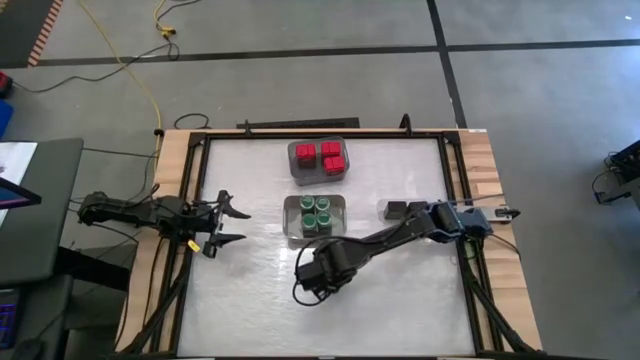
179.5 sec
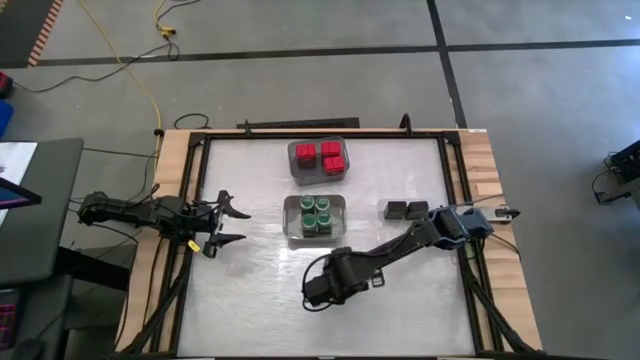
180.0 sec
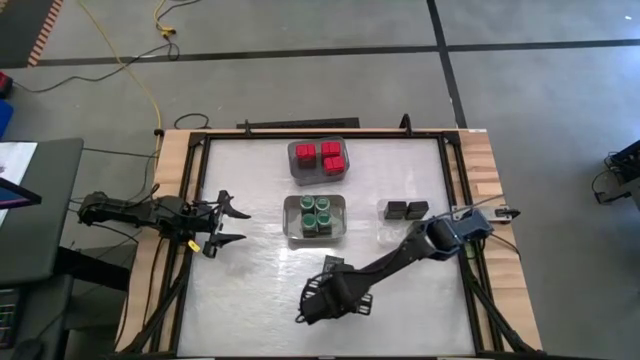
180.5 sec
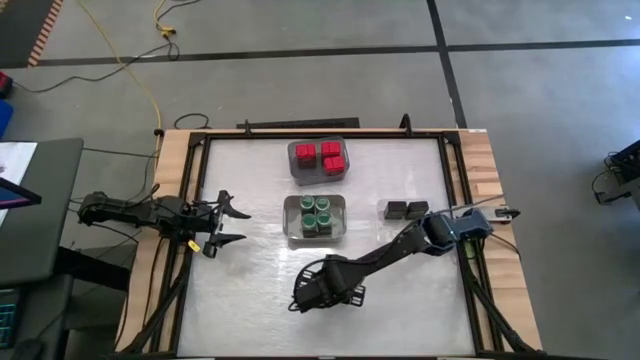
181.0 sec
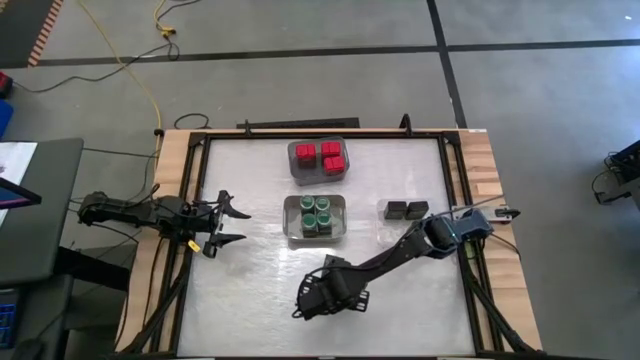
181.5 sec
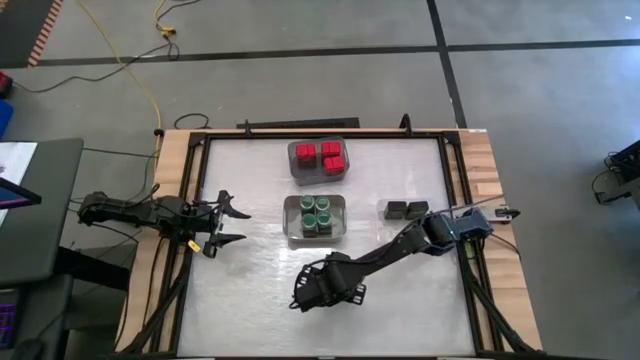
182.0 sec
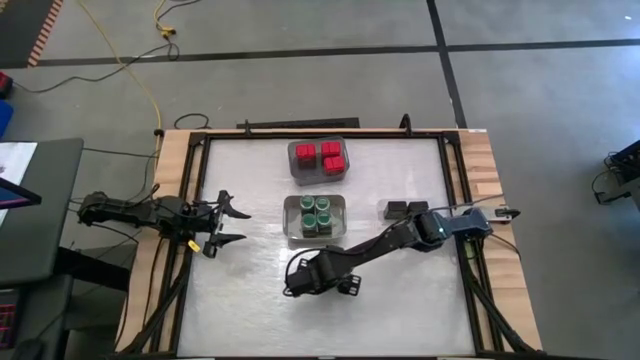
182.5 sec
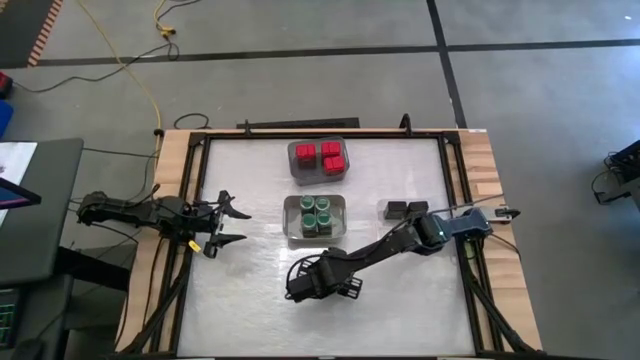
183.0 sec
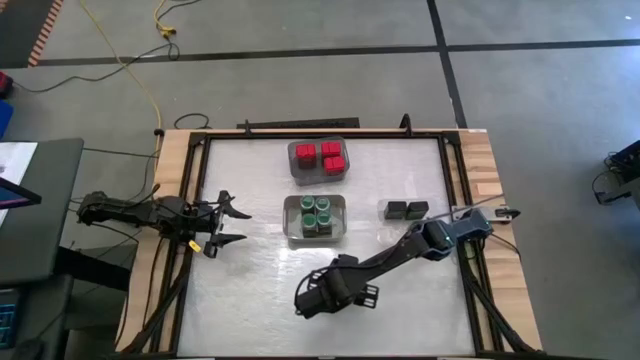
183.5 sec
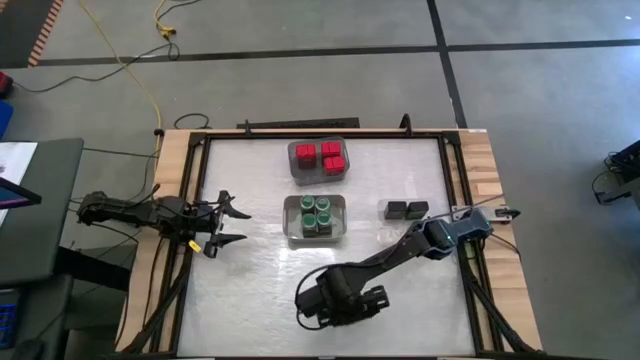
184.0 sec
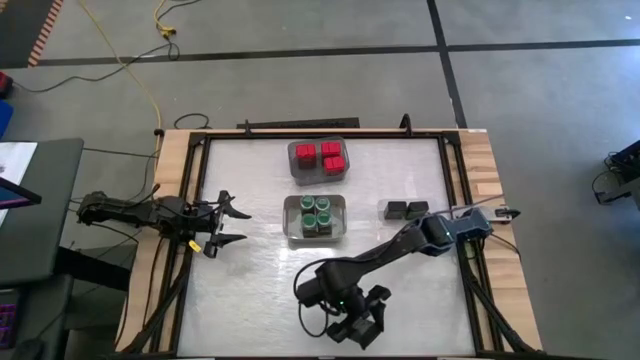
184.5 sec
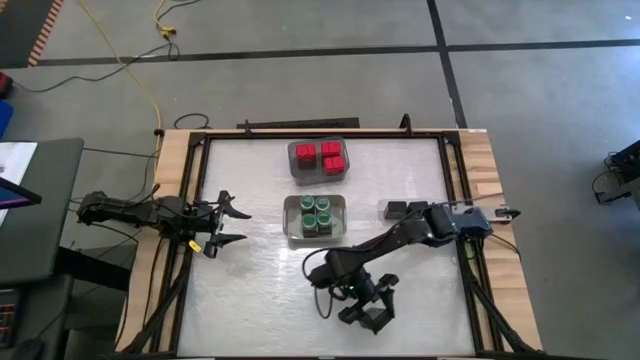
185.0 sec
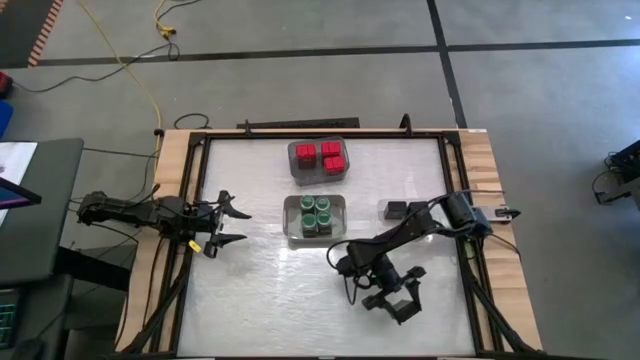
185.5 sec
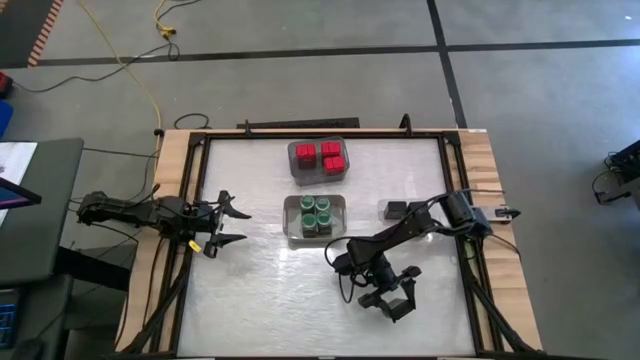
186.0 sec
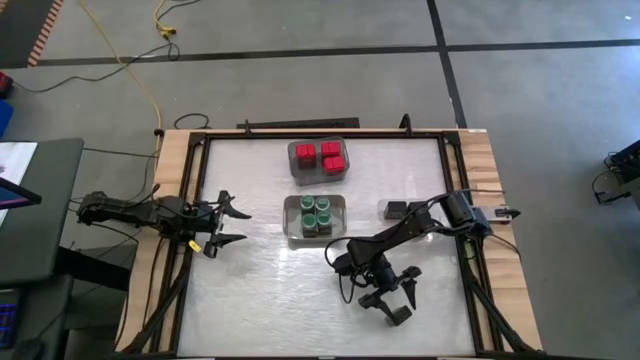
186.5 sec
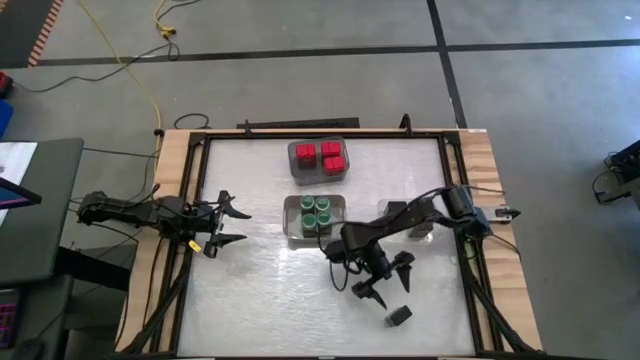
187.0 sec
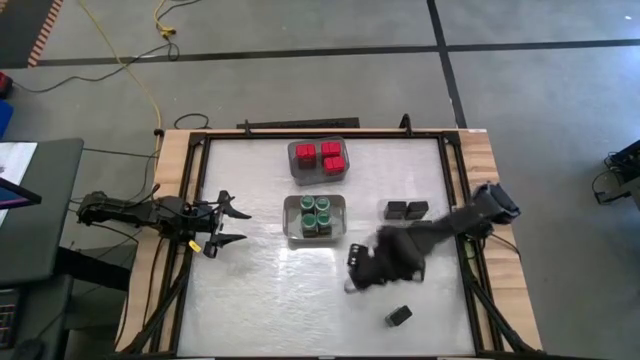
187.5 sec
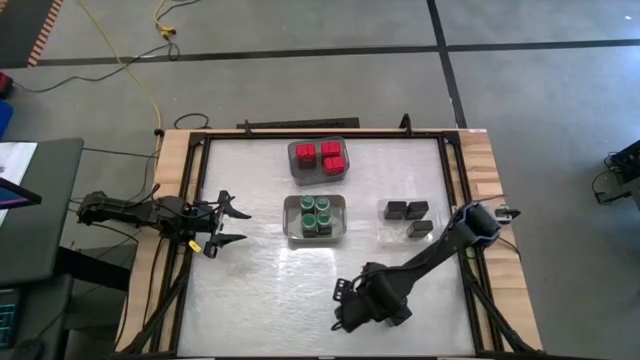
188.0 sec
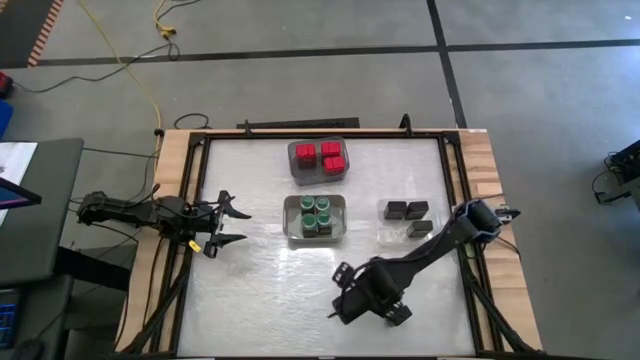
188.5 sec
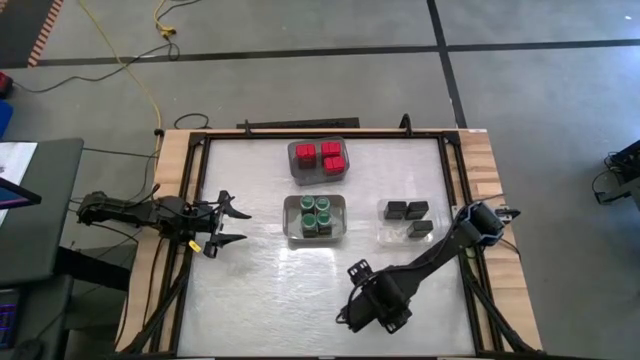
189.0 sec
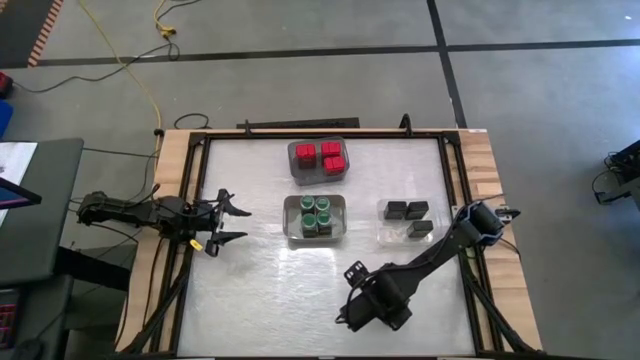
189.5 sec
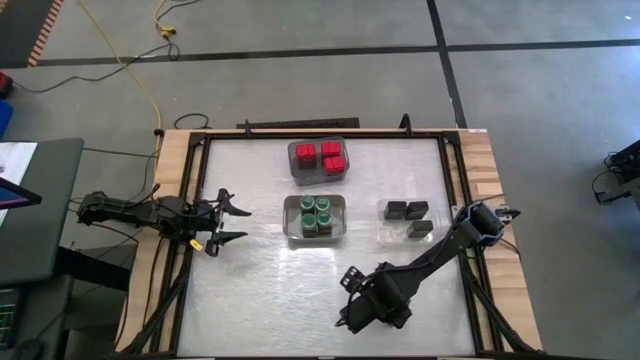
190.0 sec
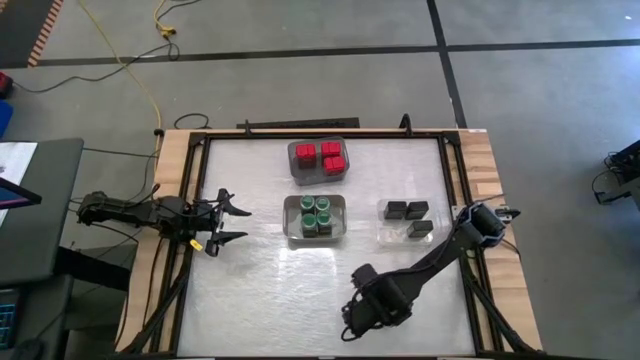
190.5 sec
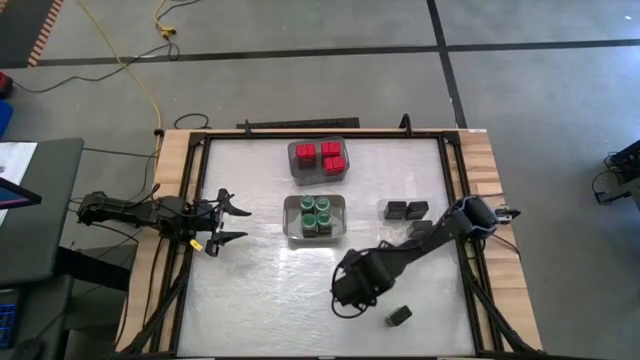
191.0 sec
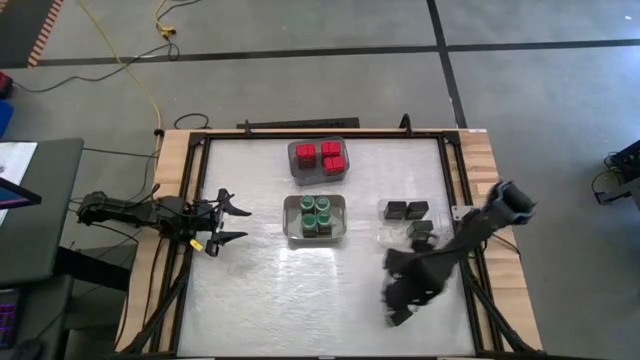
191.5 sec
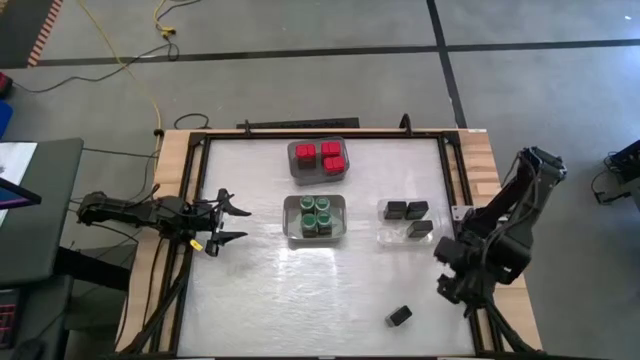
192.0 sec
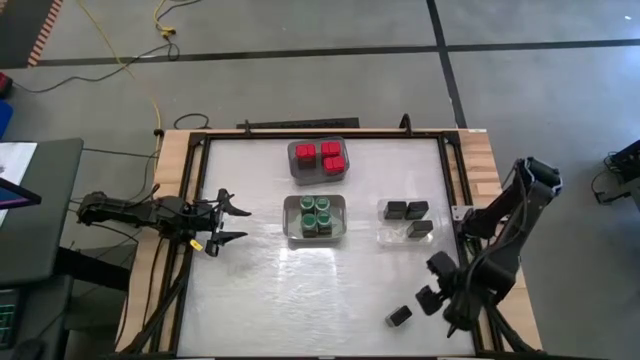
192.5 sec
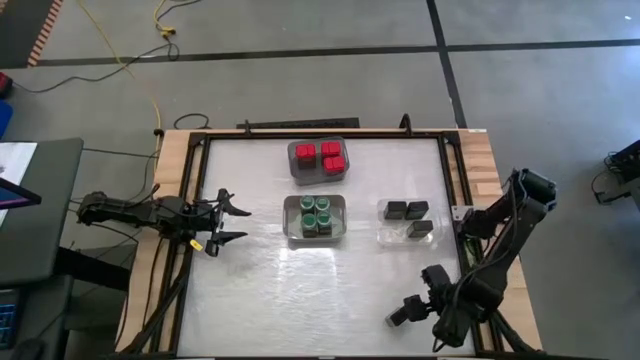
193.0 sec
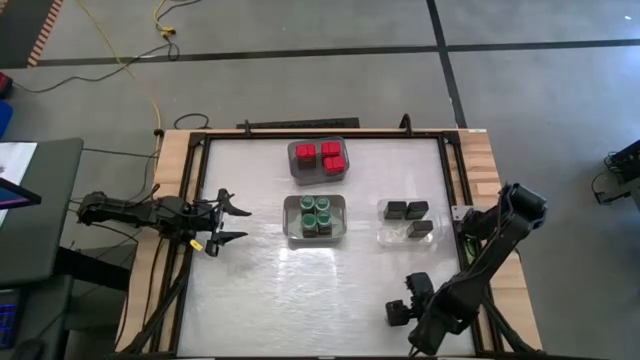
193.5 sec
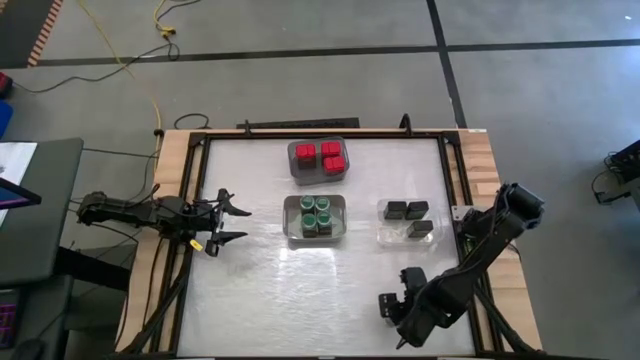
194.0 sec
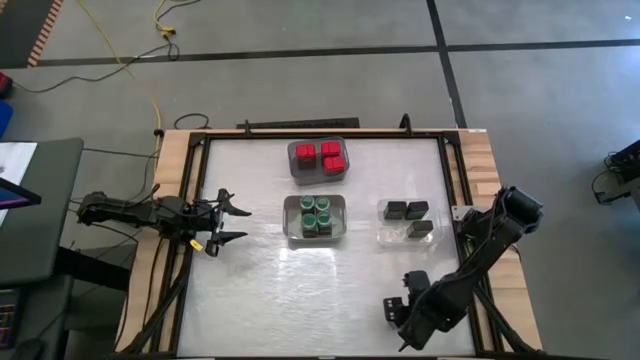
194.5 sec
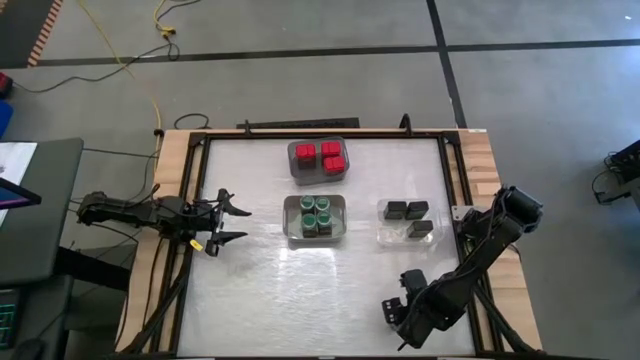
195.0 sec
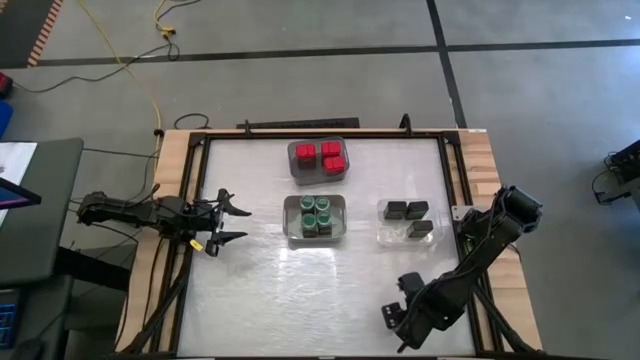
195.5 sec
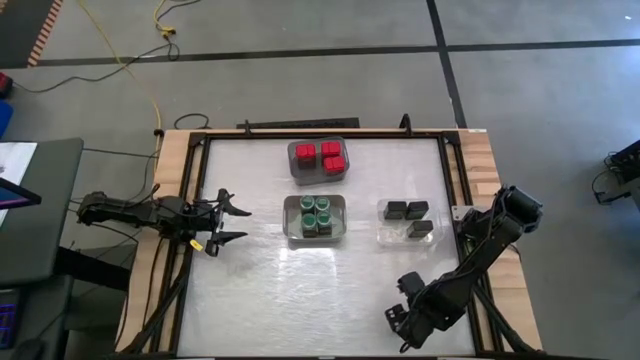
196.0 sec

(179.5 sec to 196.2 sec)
Task: Sort spices by type
Put the black spice can into the transparent bin

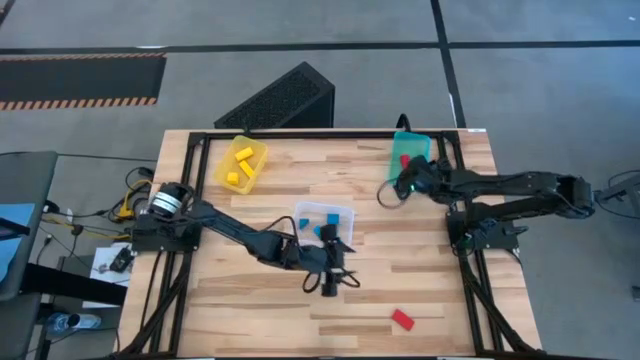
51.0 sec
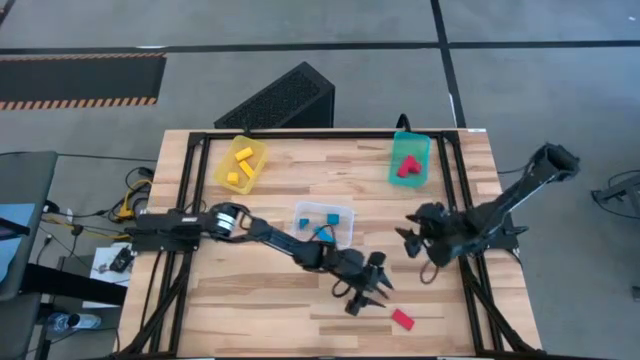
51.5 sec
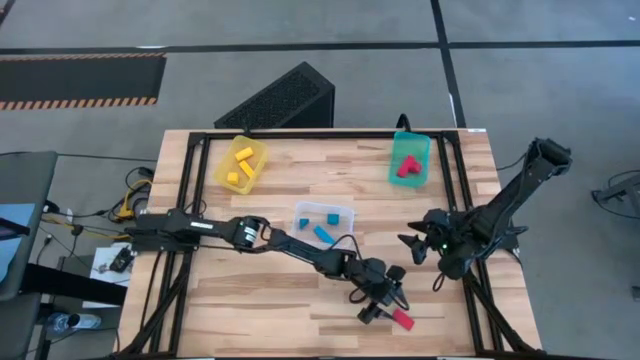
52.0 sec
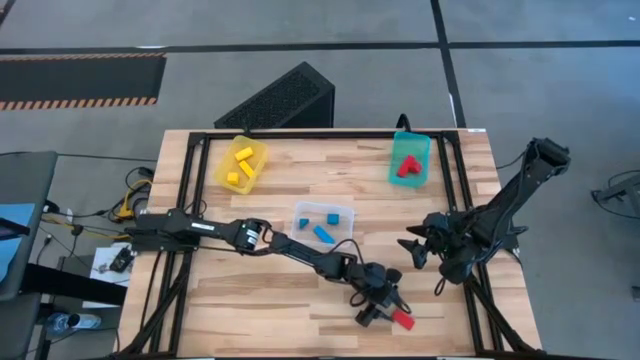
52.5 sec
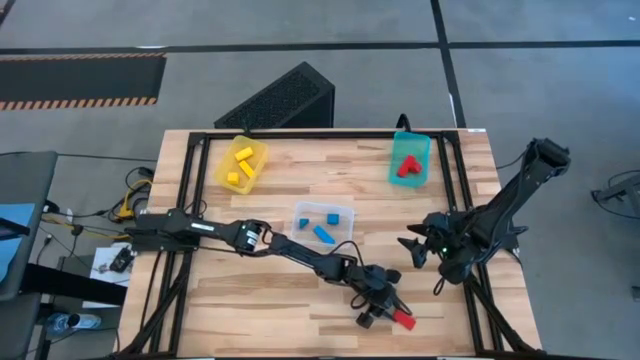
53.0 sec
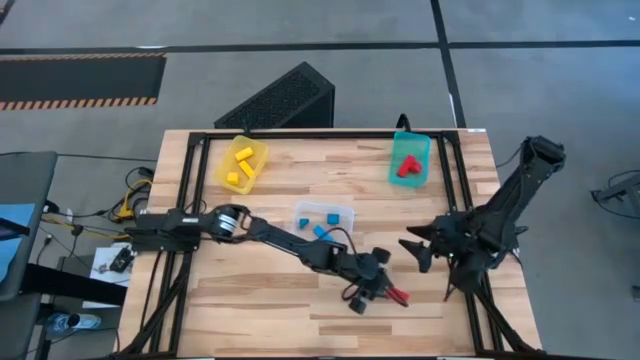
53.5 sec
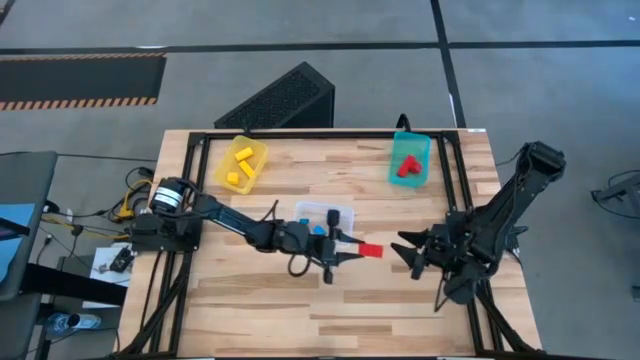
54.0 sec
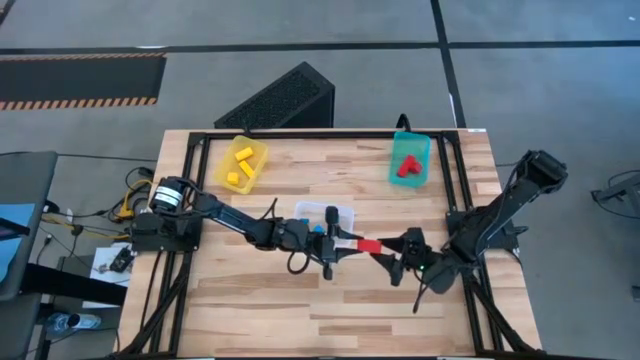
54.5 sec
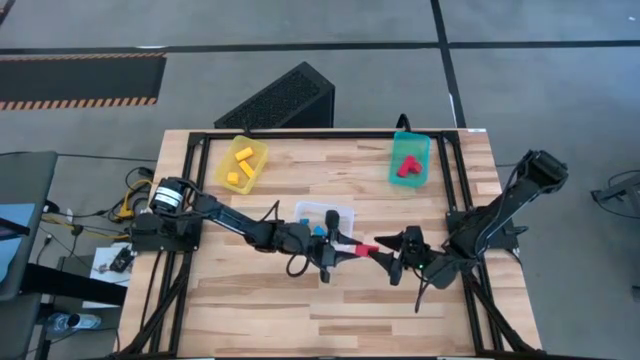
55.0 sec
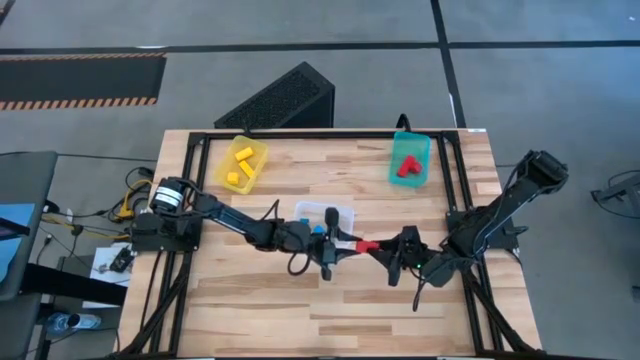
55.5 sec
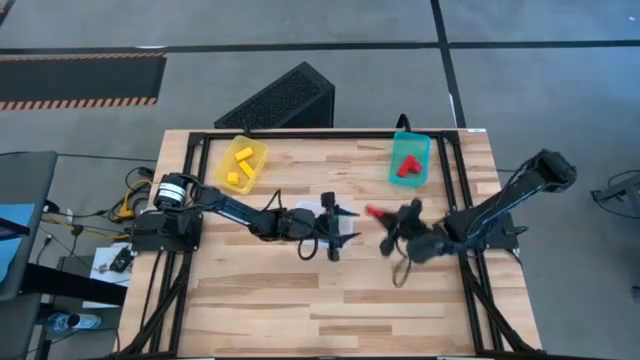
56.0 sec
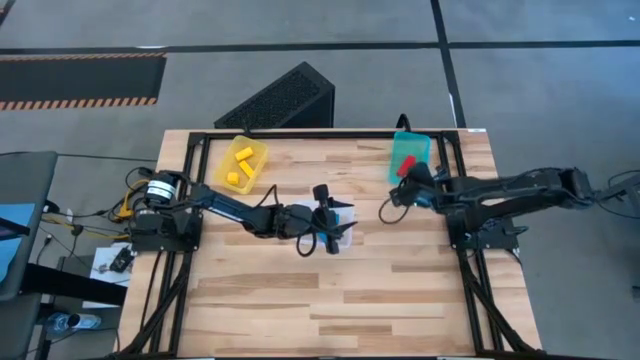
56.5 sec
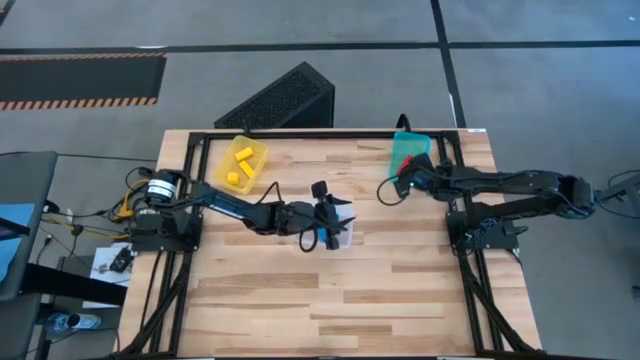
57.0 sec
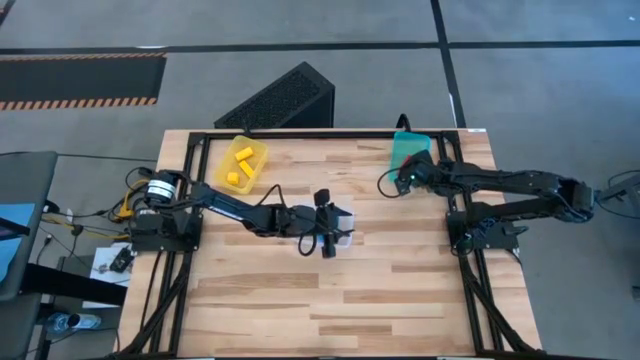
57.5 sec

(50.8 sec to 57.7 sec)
Task: Sort & place blocks by color
Put the red block into the green bin
